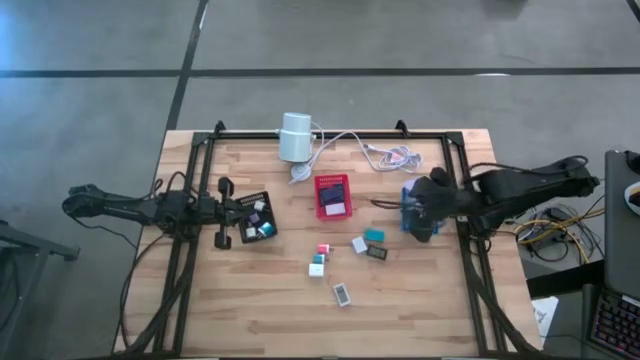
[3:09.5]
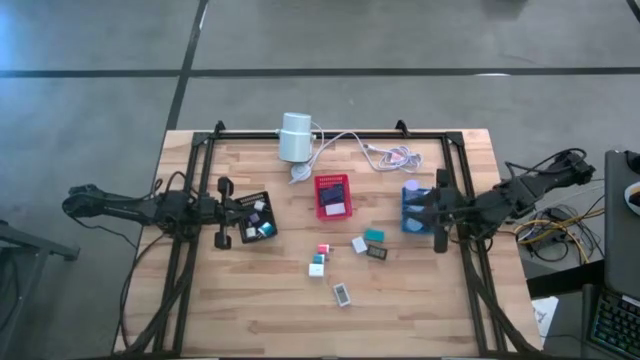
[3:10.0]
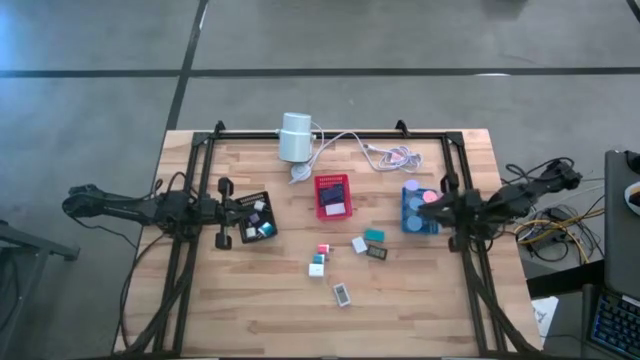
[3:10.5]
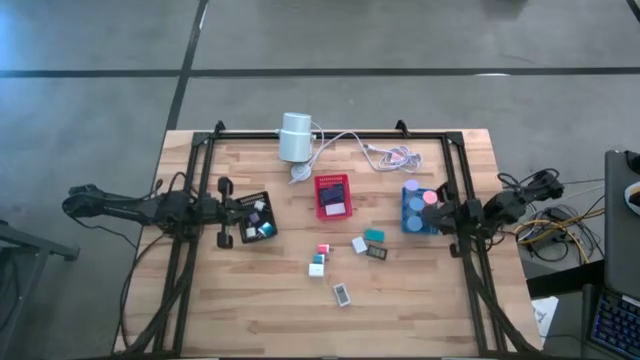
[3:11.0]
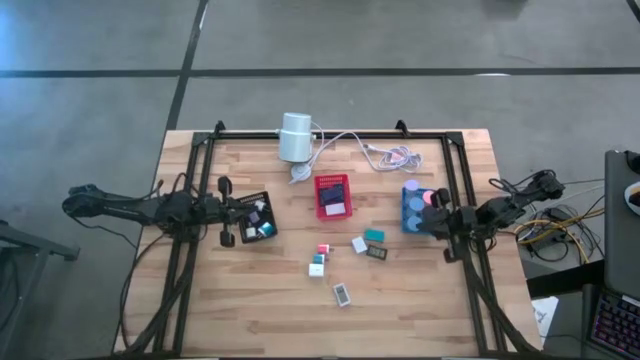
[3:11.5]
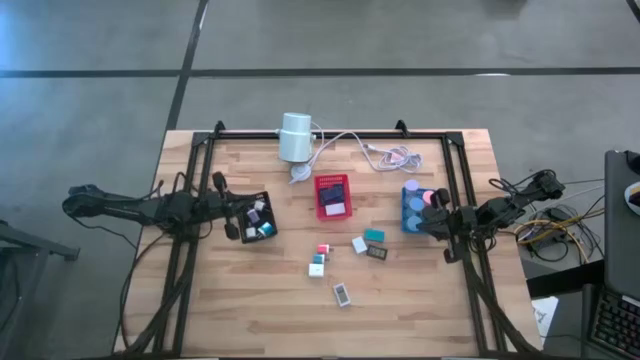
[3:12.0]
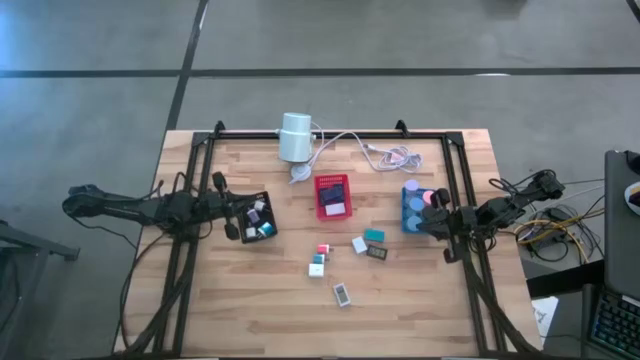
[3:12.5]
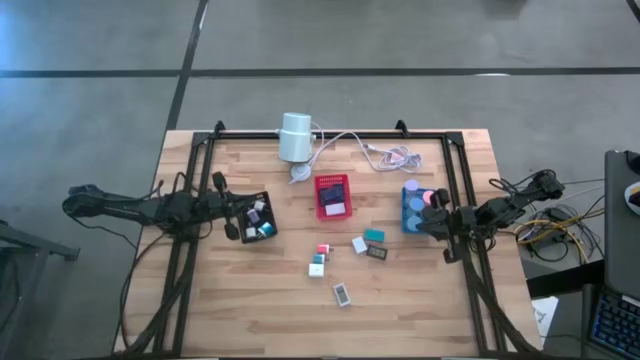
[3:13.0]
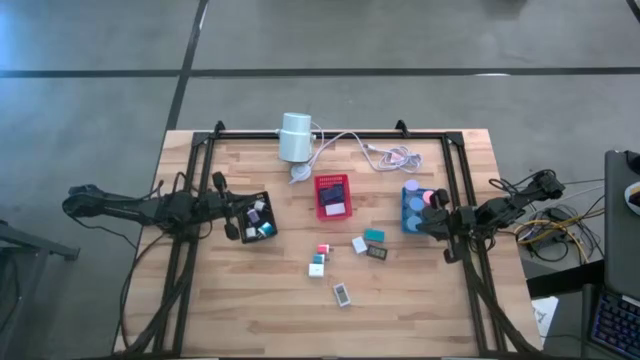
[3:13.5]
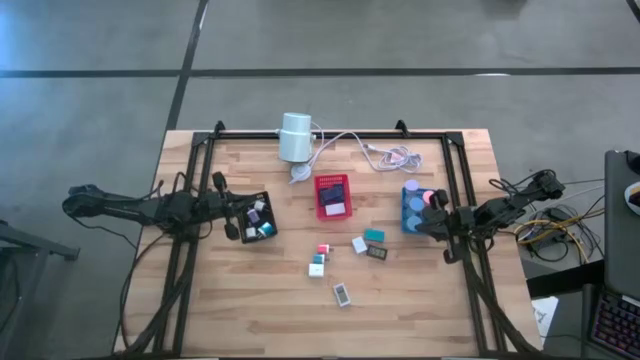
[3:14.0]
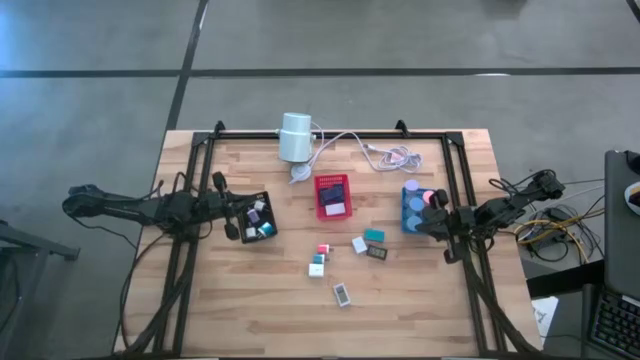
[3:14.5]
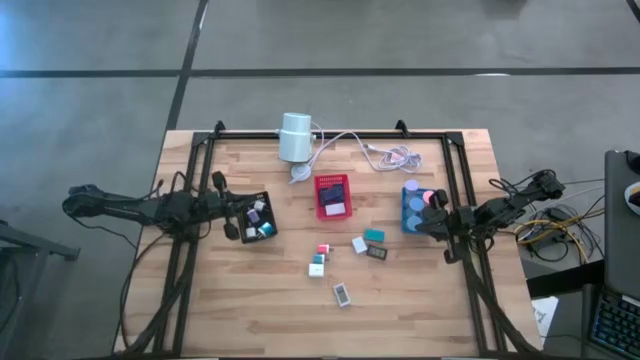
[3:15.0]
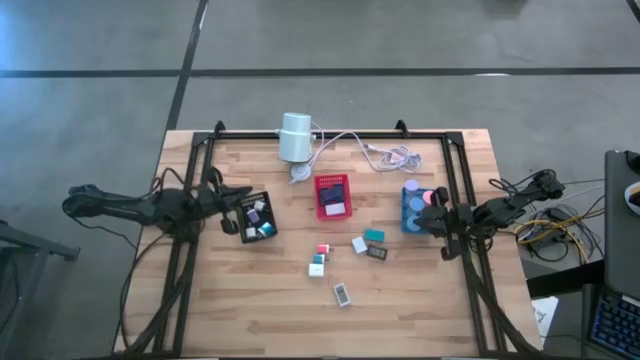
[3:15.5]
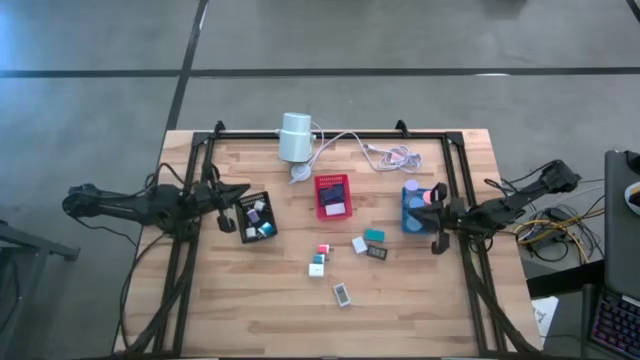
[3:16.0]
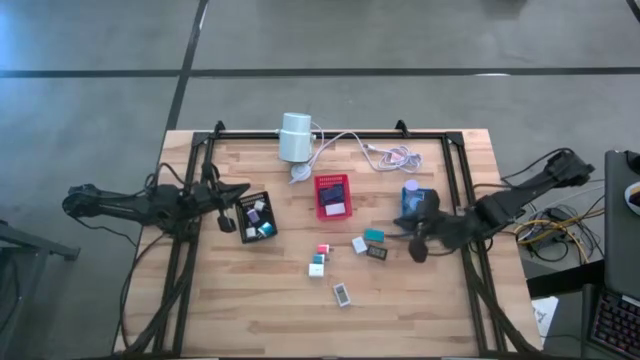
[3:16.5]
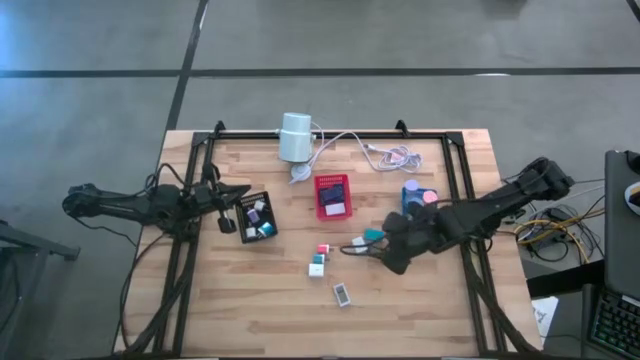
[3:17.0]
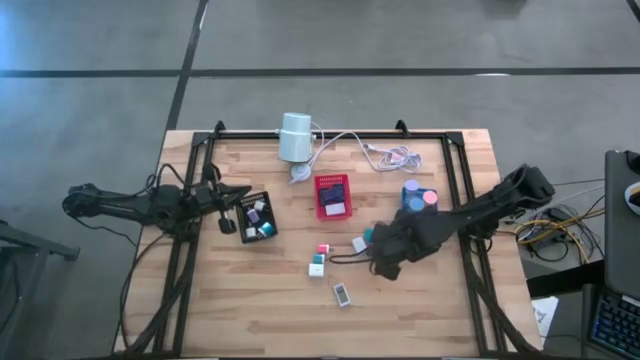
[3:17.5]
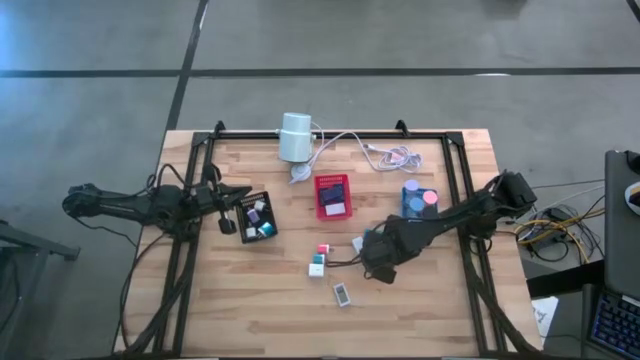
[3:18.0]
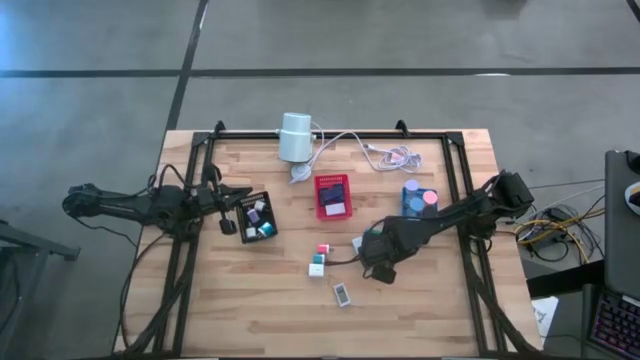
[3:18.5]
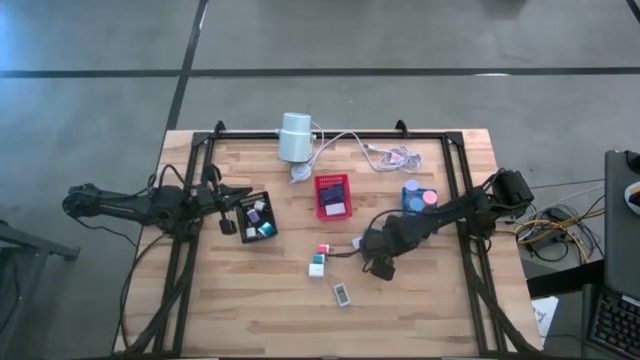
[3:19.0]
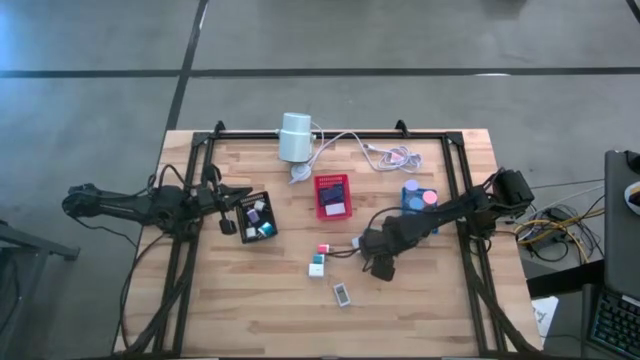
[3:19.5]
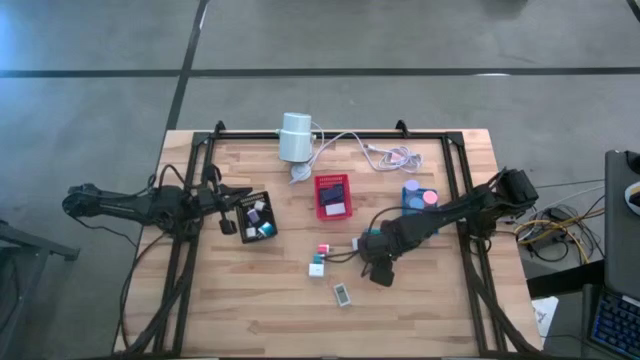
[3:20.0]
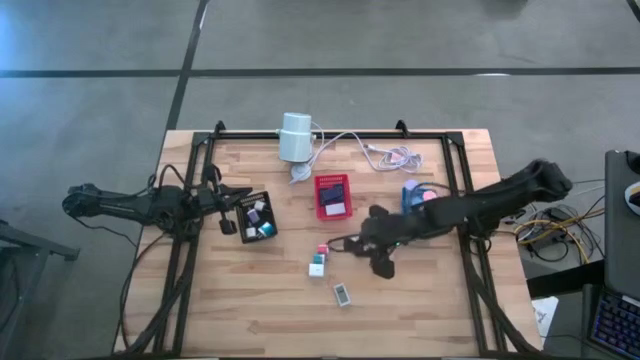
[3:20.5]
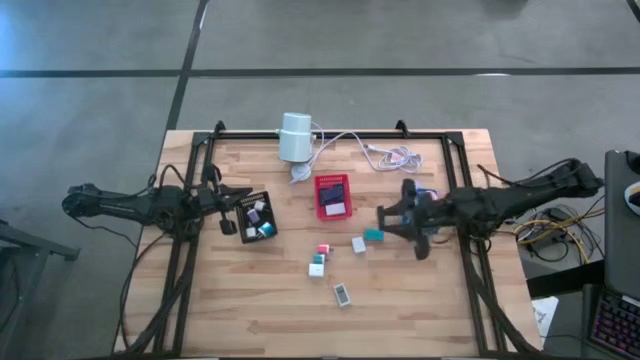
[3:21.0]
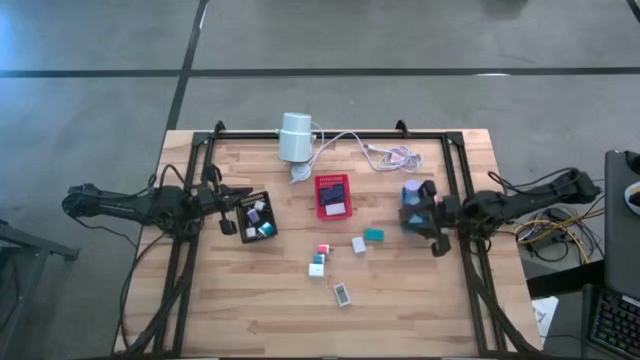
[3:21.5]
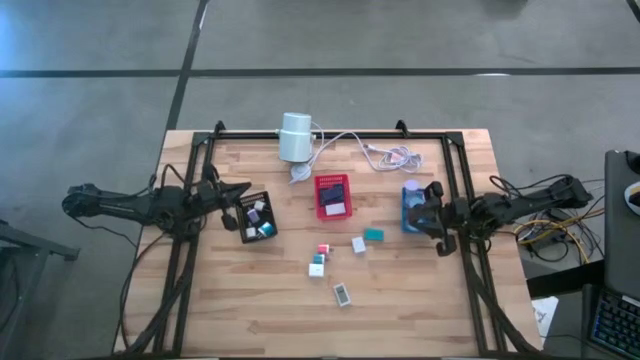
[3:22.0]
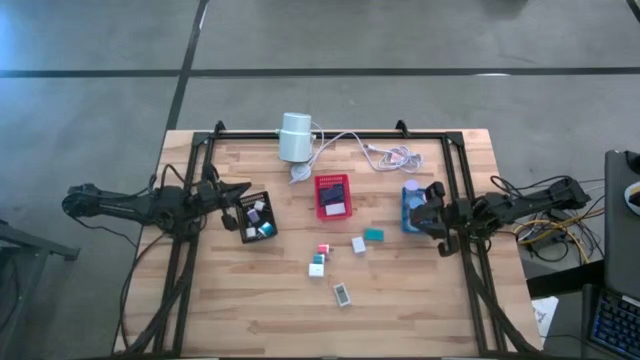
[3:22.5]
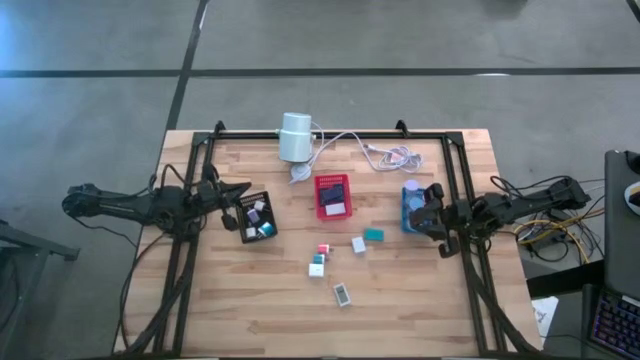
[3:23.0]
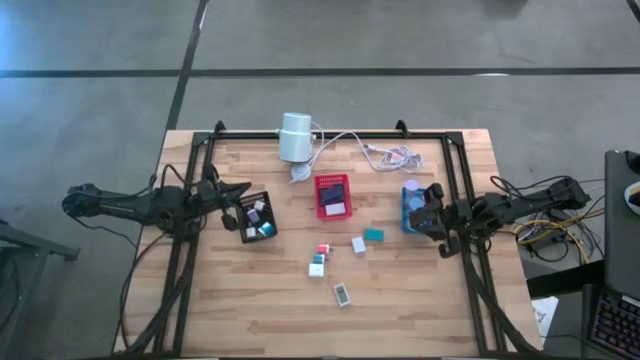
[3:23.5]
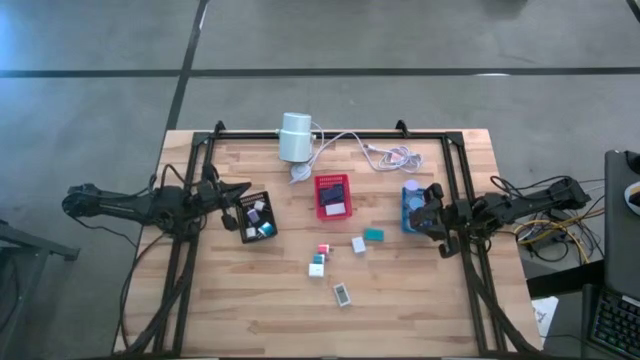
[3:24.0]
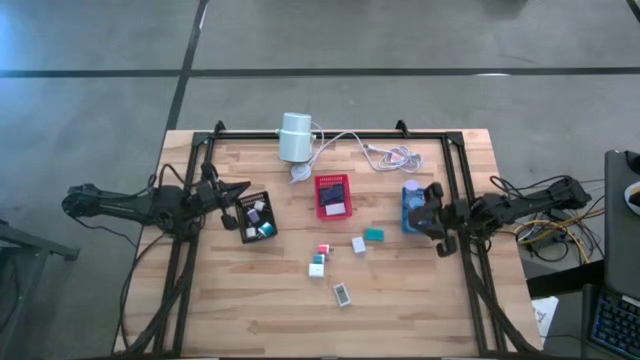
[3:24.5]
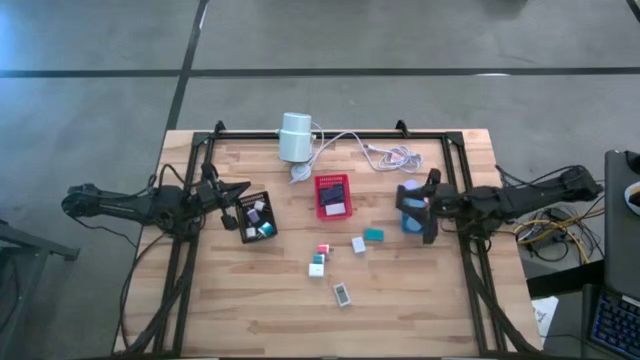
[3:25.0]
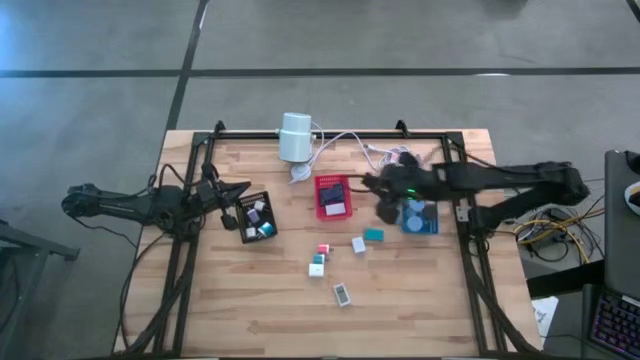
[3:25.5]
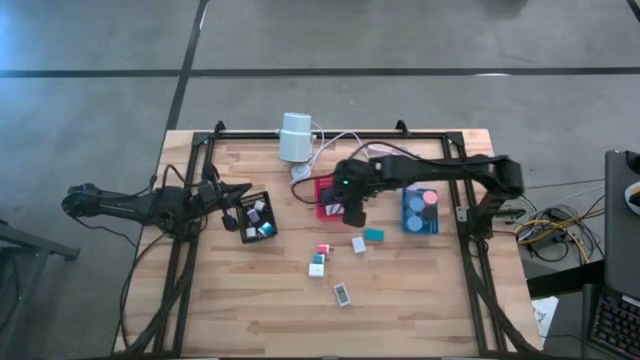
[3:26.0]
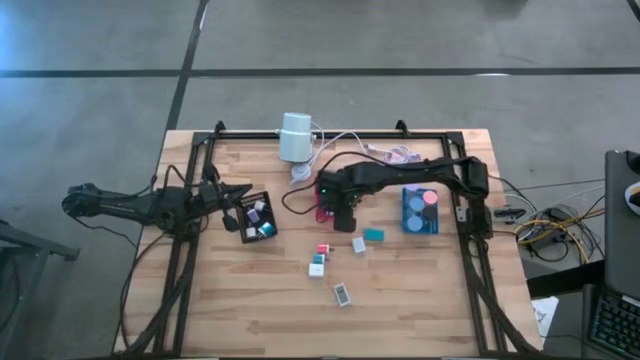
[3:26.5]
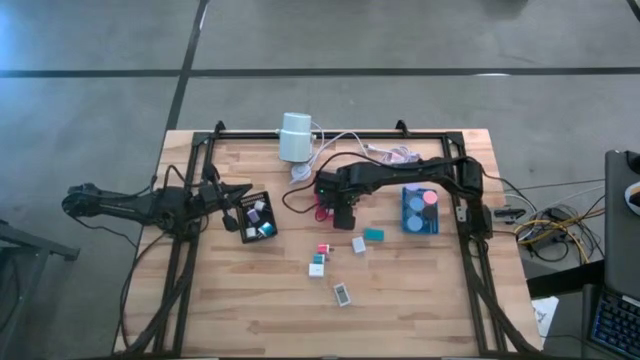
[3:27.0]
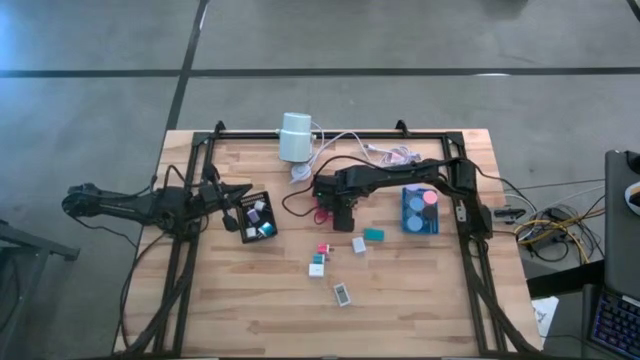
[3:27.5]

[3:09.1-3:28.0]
Task: Pick & Place Office items
Put the black digital clock into the red basket

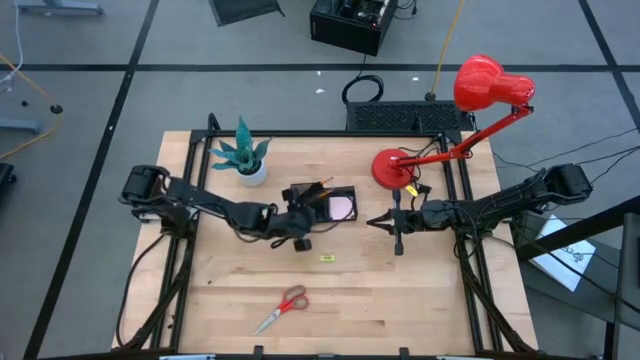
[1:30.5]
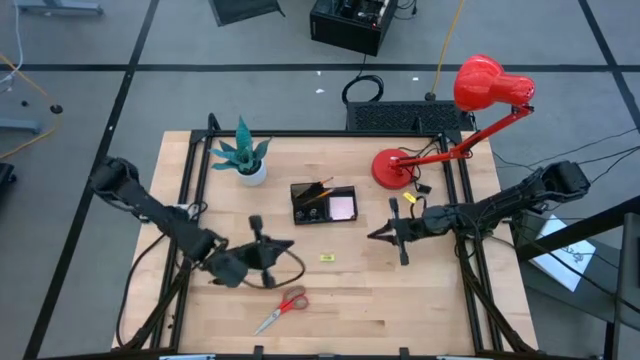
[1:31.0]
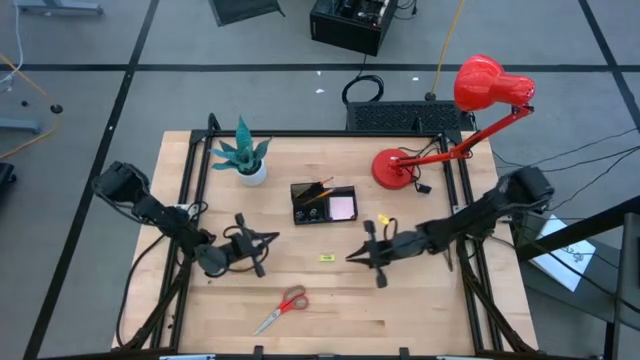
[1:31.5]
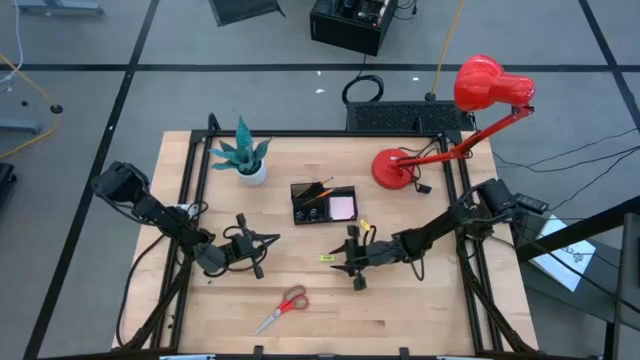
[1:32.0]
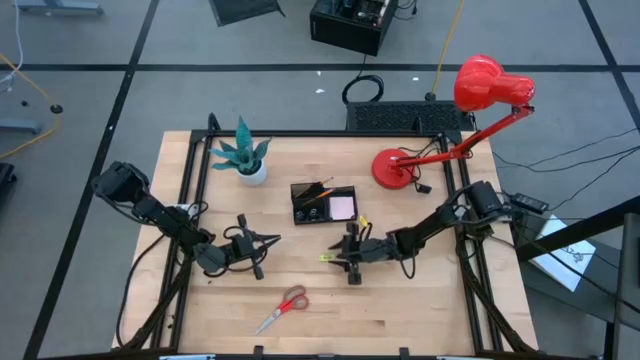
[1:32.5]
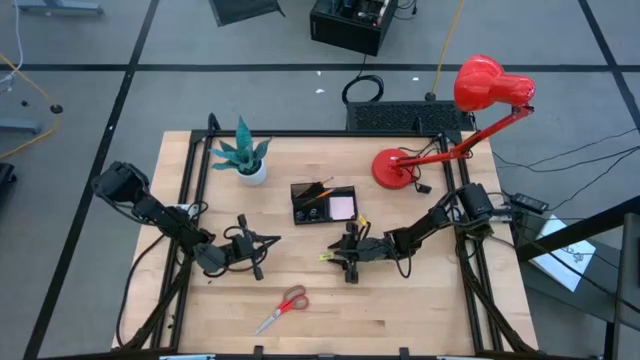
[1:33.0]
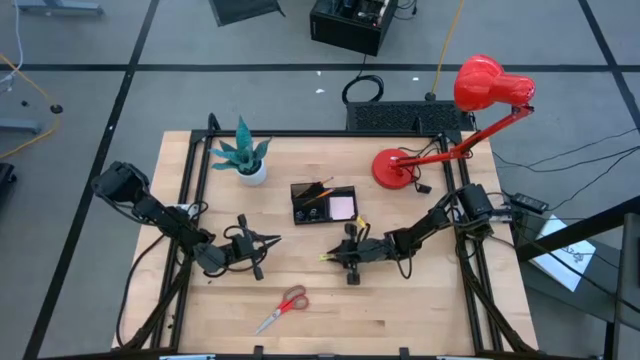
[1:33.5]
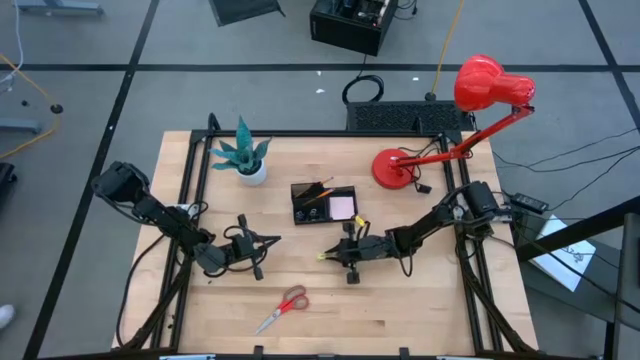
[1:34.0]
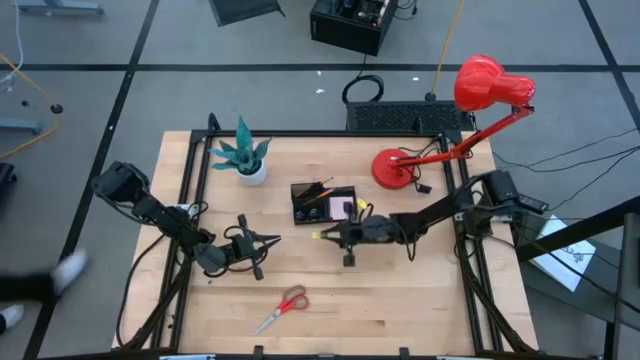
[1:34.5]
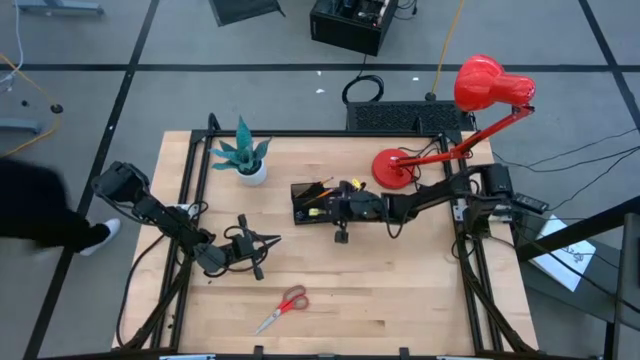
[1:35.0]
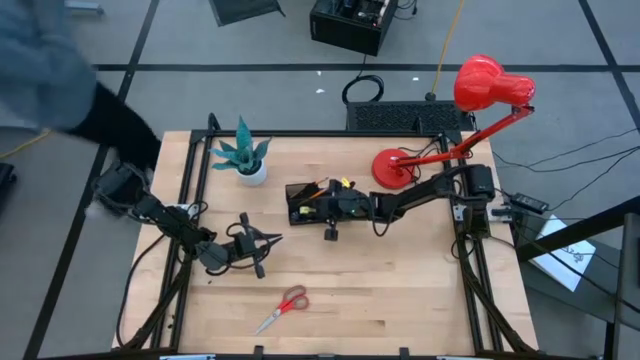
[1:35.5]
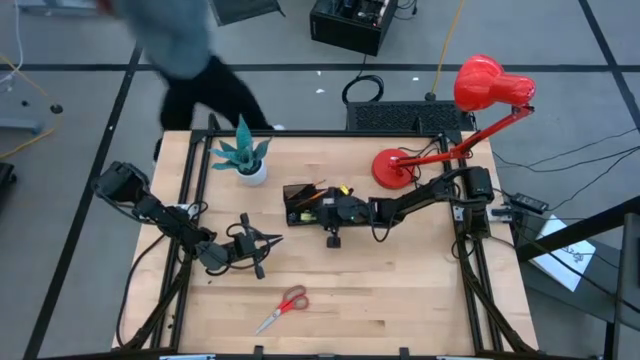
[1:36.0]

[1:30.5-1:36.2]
Task: Pick and place office supplies into organizer
Put the yellow eraser into the black desk organizer
